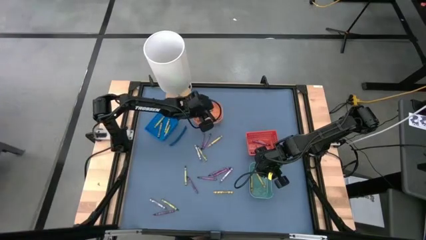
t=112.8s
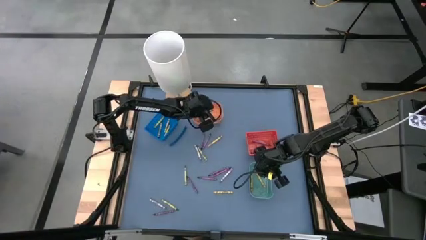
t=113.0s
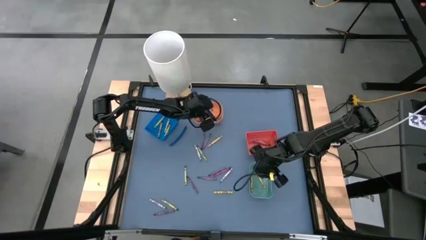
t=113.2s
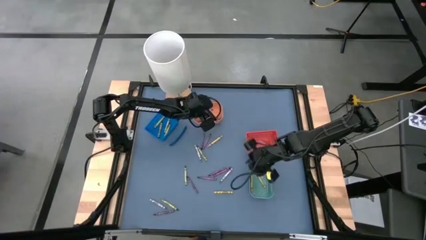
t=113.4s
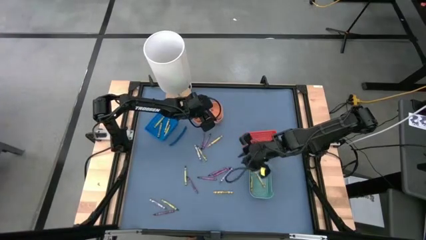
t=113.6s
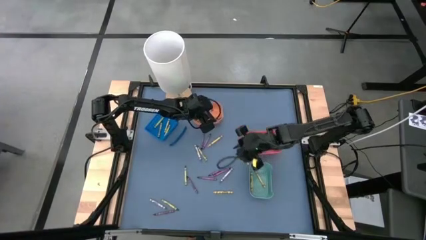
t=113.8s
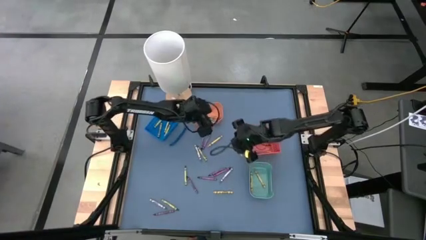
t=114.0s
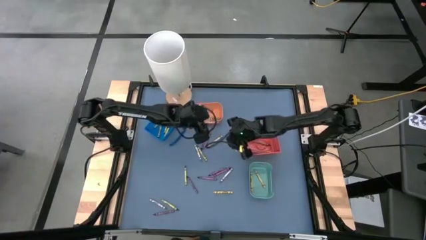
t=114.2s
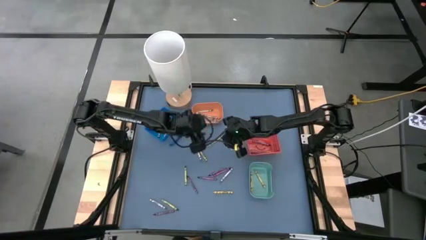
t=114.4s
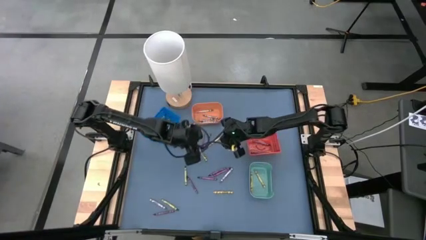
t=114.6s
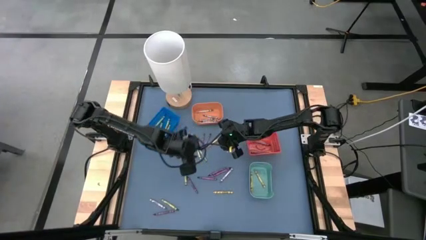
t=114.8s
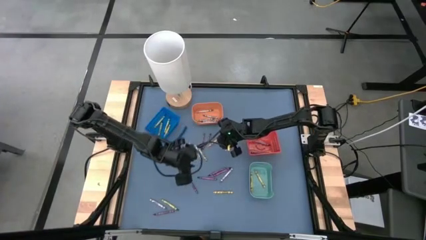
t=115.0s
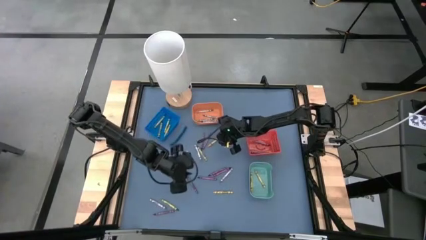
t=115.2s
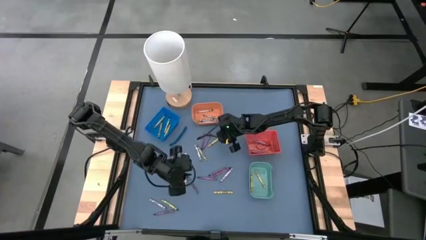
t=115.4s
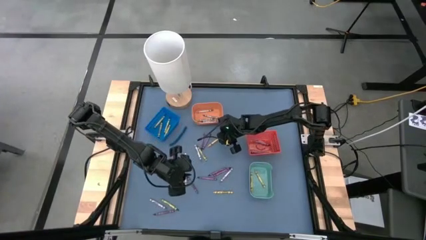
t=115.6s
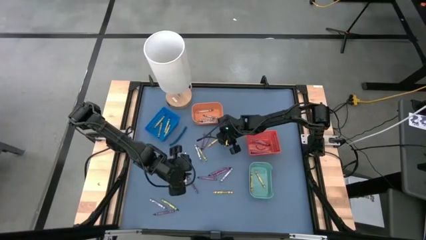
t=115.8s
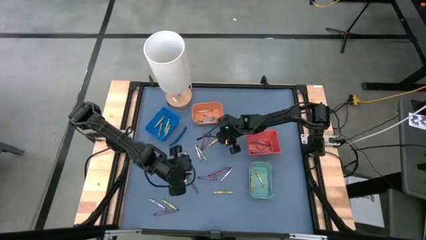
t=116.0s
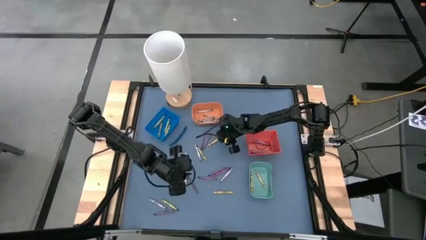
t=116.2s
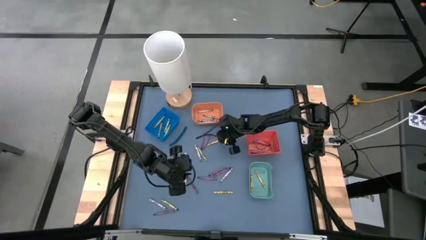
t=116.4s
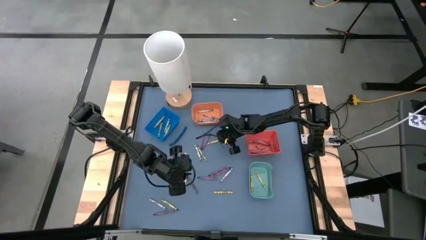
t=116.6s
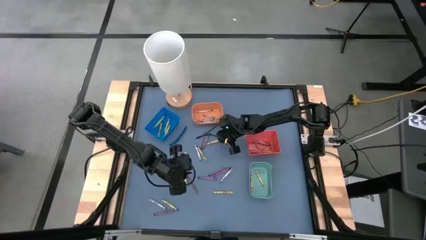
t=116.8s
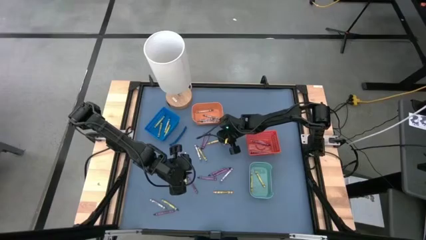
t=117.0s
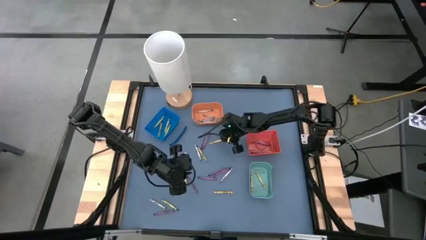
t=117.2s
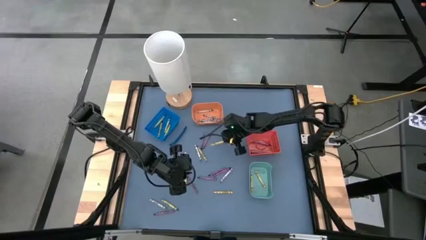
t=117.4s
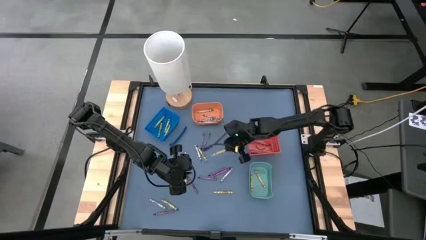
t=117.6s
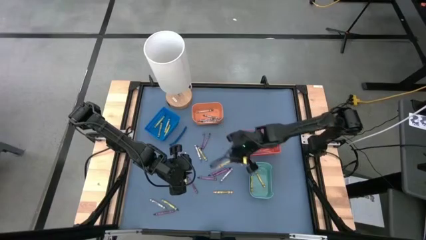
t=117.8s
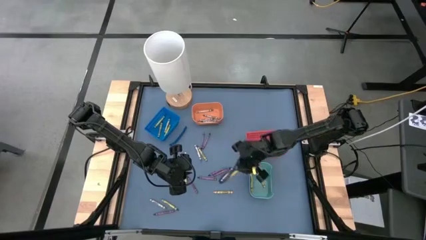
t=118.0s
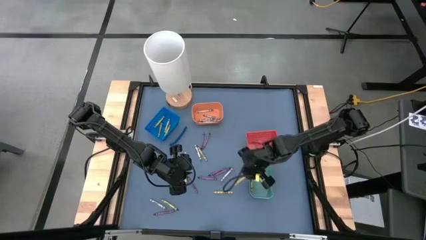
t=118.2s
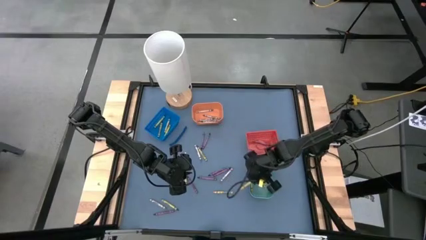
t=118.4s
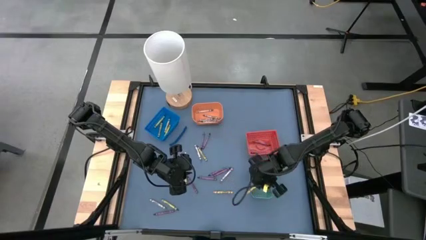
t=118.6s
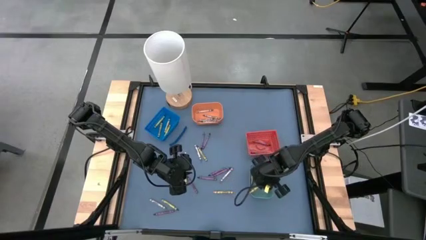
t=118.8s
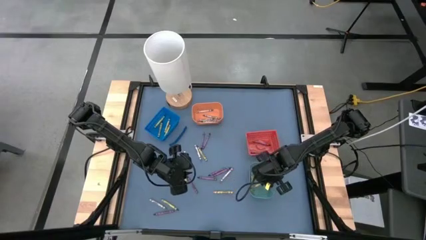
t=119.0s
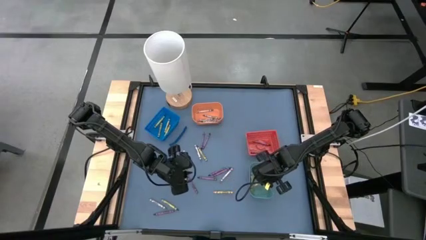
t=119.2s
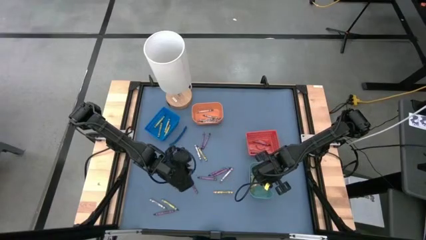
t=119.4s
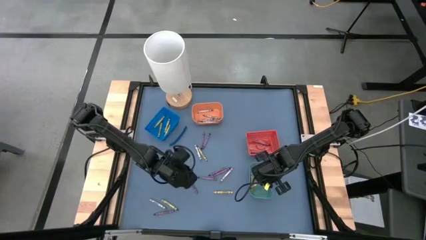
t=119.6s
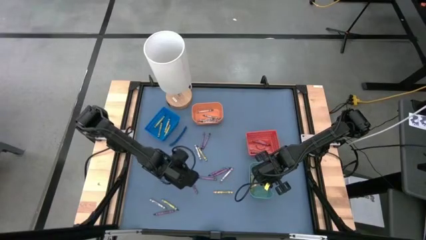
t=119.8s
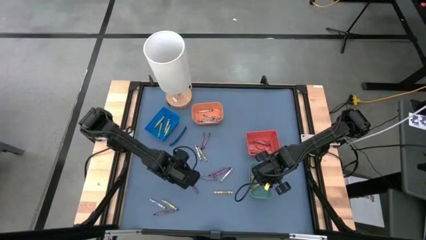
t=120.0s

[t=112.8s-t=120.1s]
Task: Sort crayons
Put the yellow crayon into the light blue bin

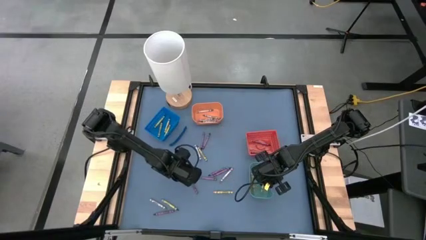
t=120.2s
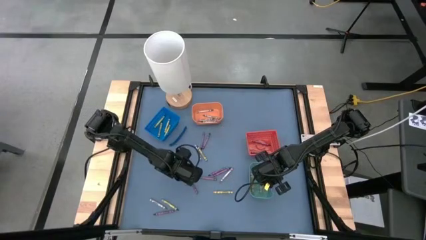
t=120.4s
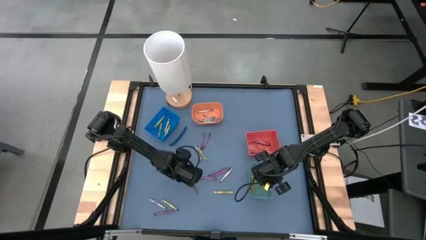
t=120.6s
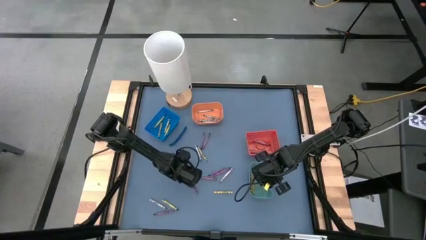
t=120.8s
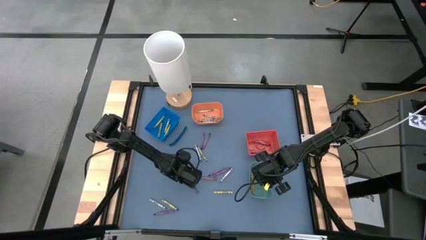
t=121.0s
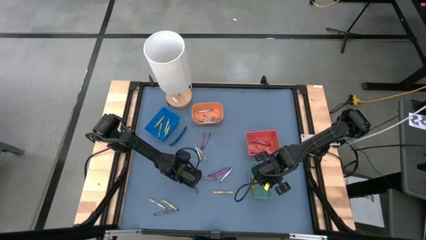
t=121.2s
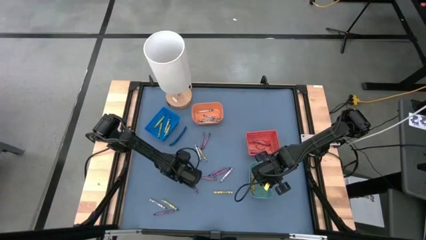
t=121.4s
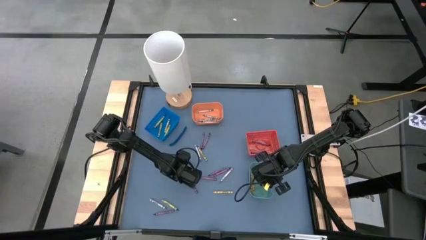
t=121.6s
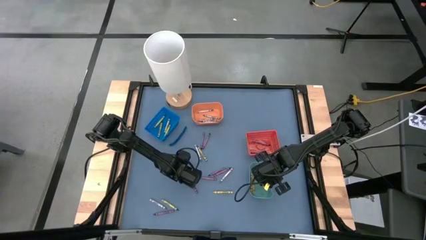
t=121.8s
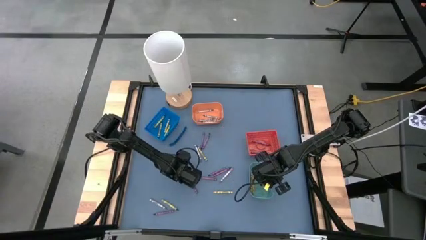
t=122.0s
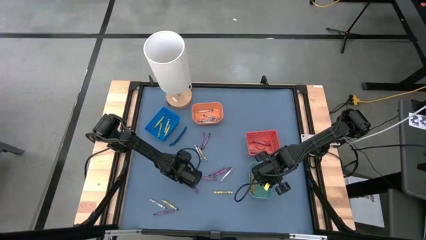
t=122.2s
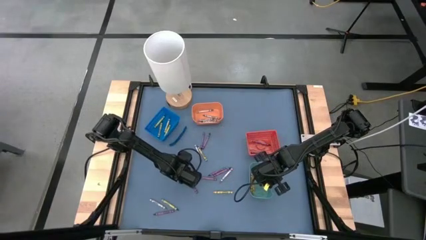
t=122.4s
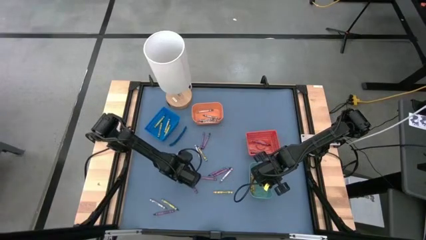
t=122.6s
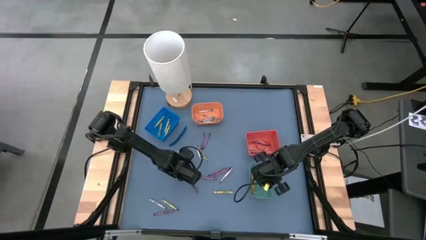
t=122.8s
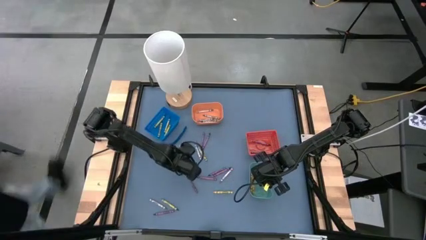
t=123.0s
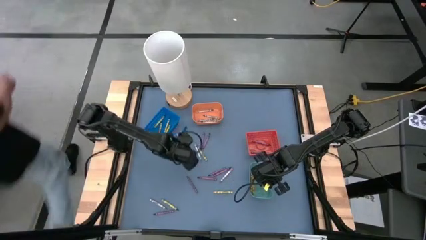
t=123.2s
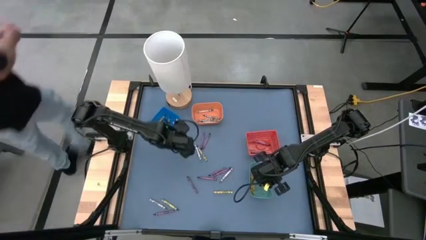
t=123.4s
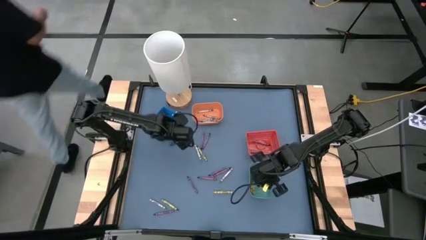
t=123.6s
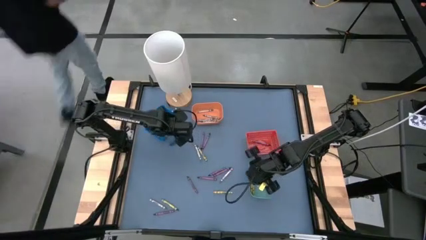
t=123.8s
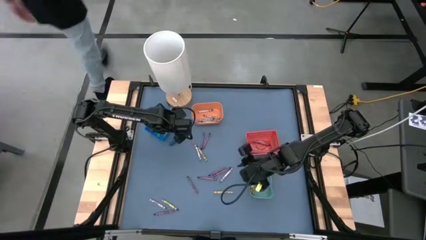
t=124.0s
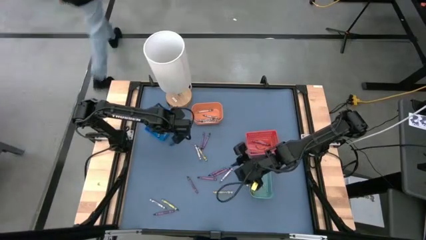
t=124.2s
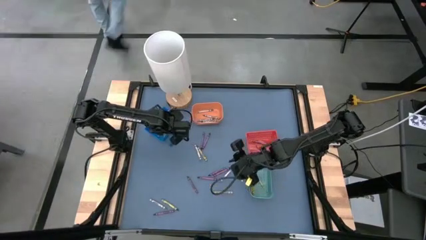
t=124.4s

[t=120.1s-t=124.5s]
Put the green crayon into the dark blue bin

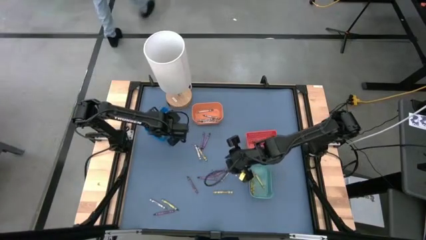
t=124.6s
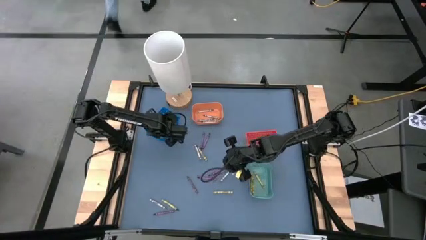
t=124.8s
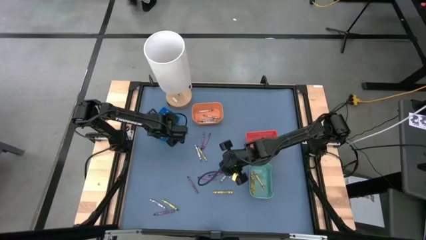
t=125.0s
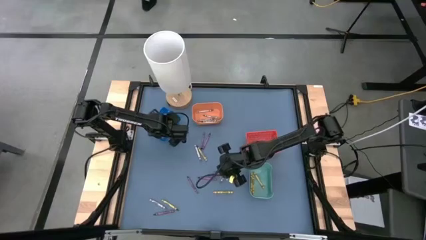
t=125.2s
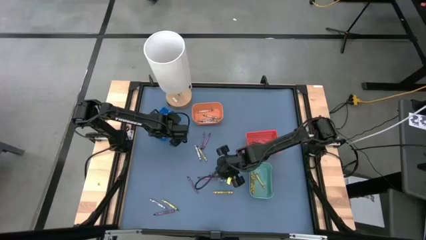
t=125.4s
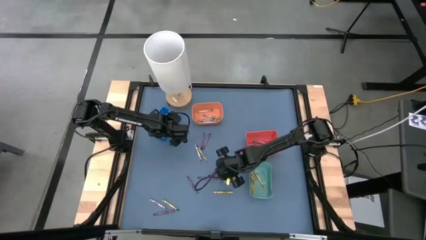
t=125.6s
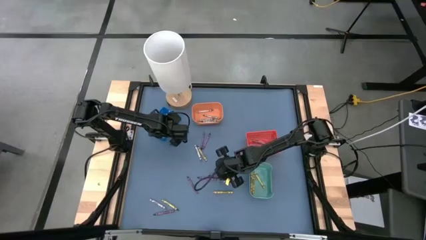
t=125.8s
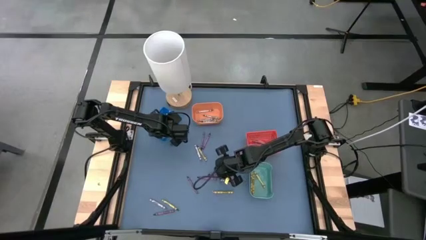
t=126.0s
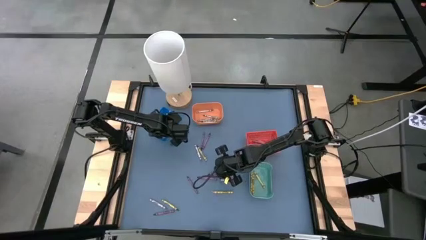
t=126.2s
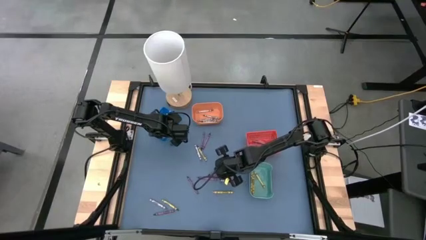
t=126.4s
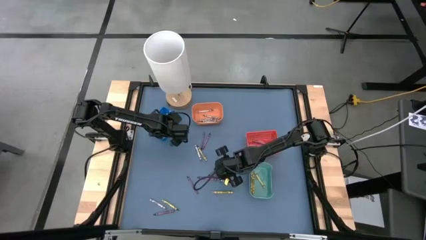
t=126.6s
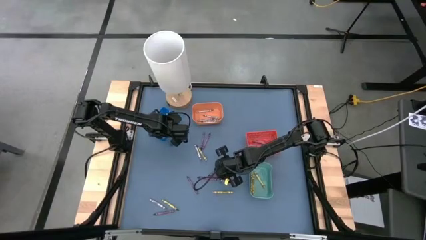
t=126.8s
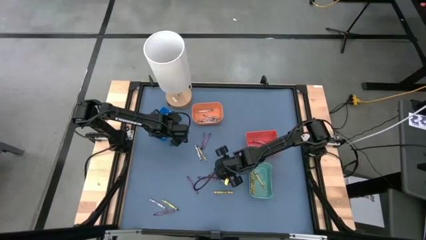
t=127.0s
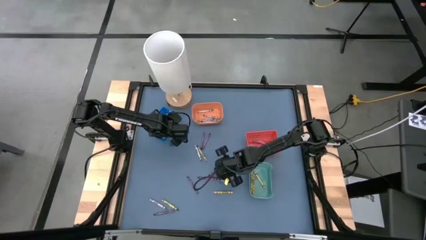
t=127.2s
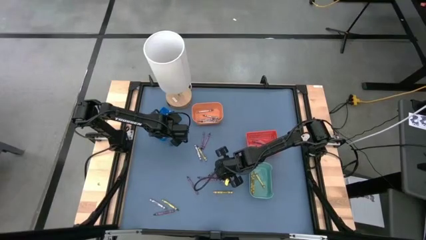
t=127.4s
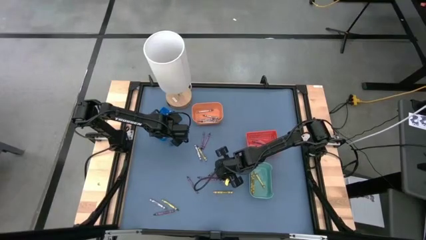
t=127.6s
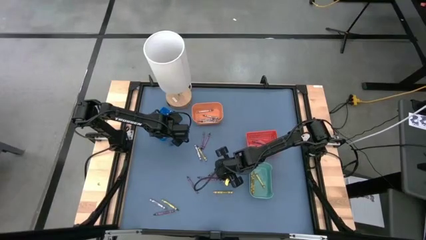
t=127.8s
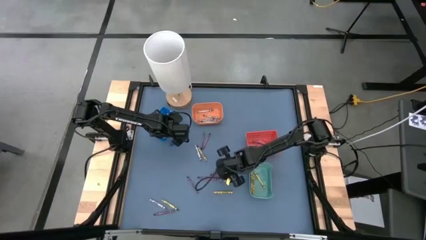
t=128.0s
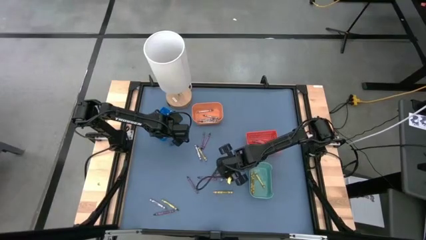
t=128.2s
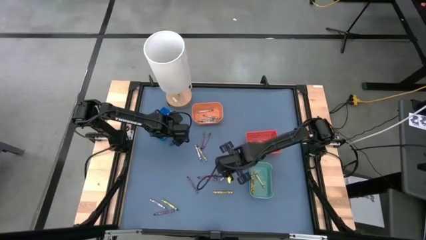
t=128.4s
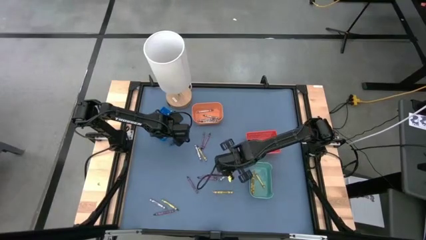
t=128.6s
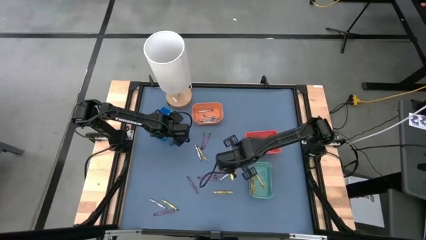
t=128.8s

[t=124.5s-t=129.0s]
Put the violet crayon into the red bin
